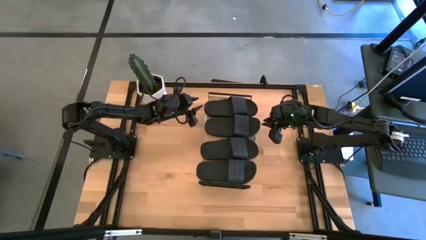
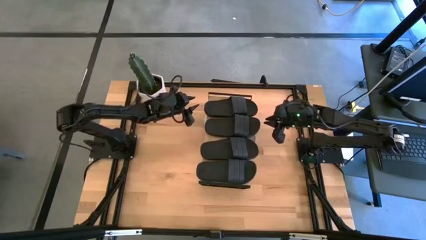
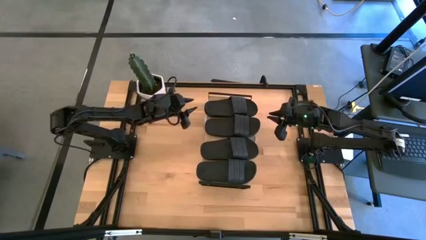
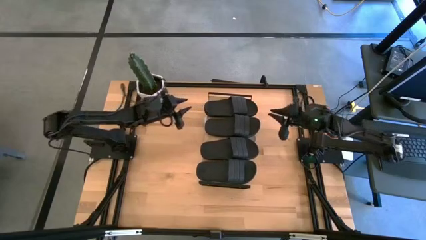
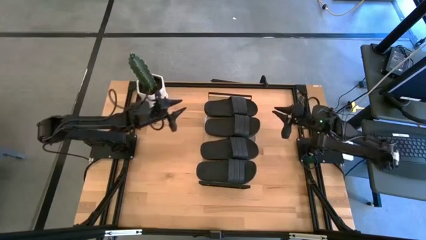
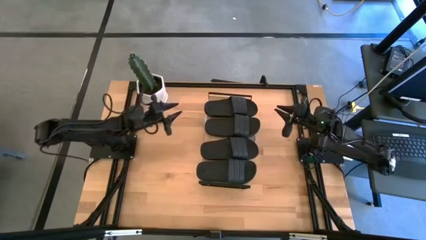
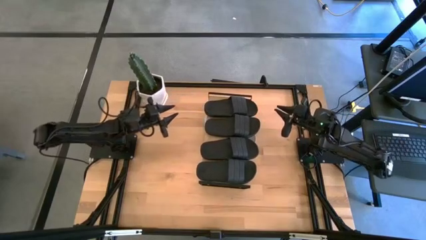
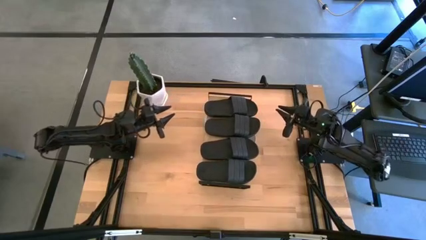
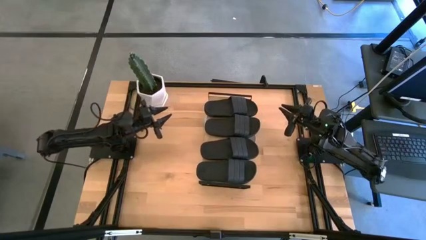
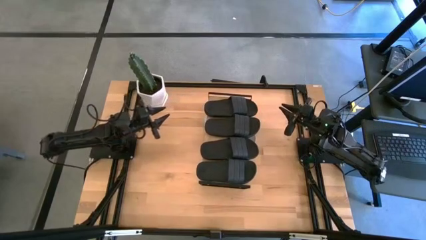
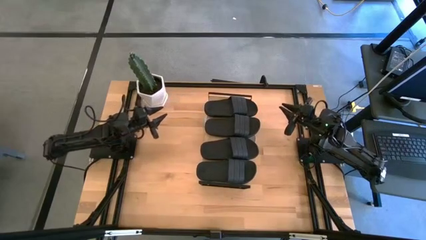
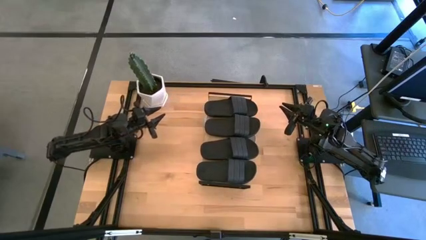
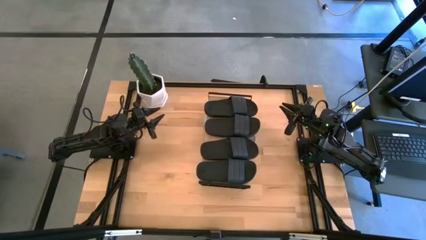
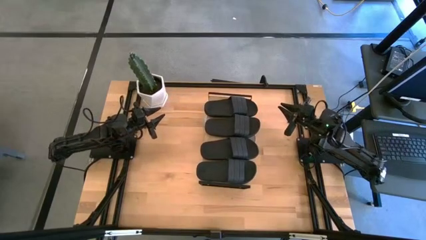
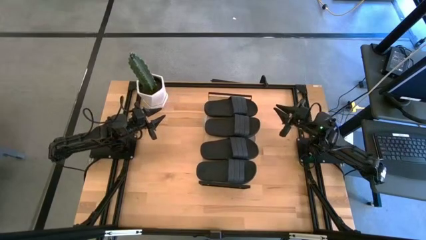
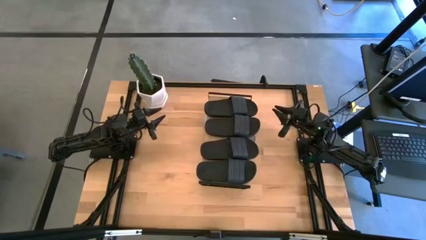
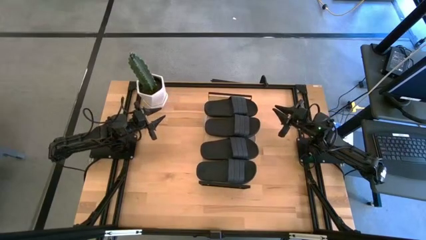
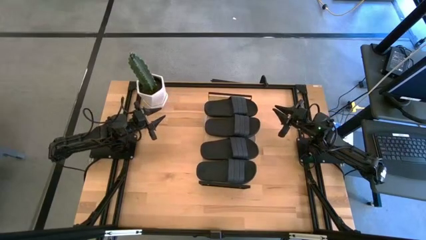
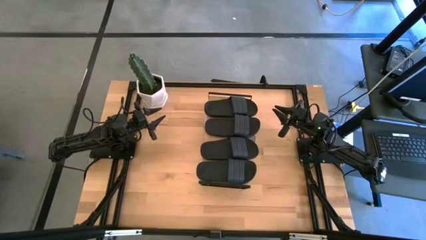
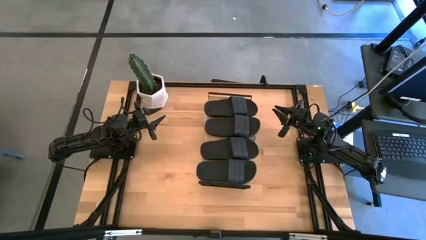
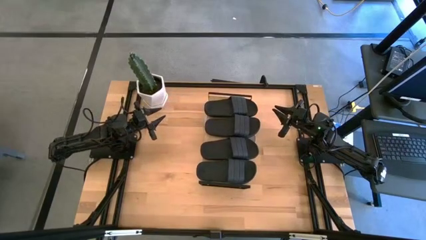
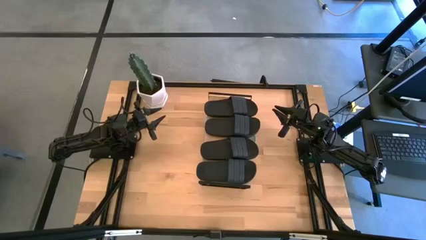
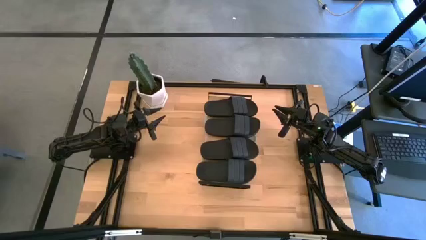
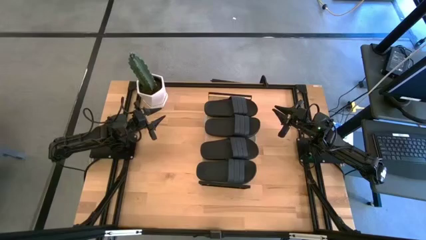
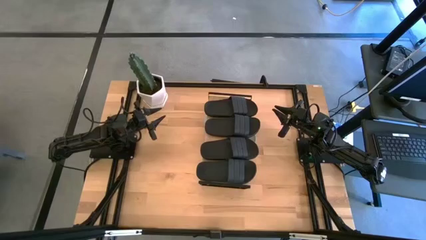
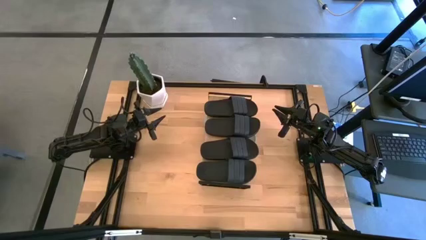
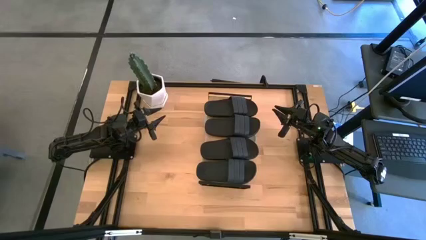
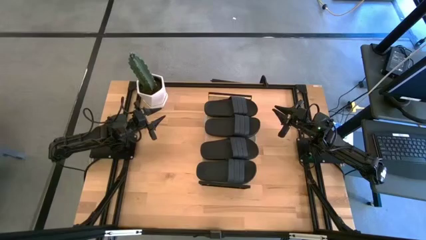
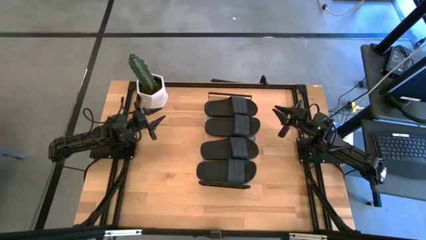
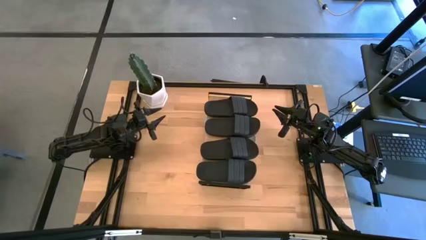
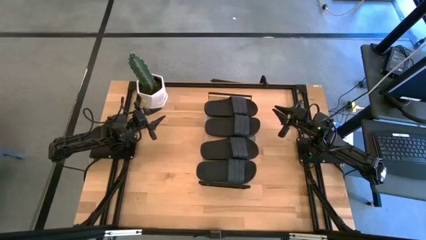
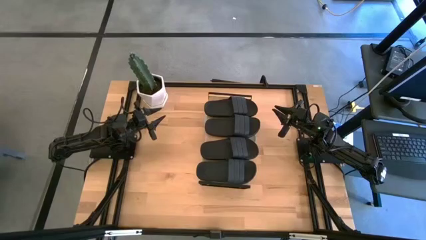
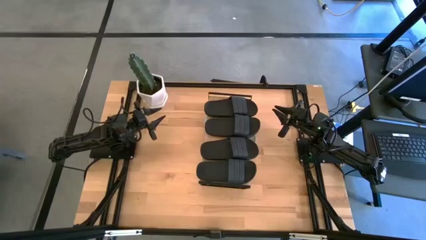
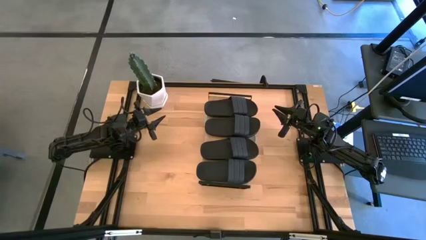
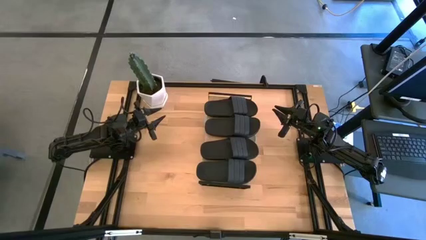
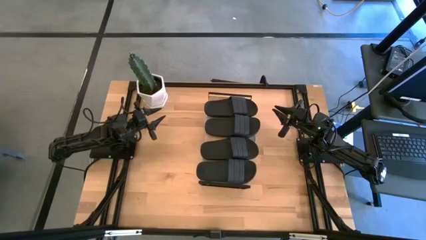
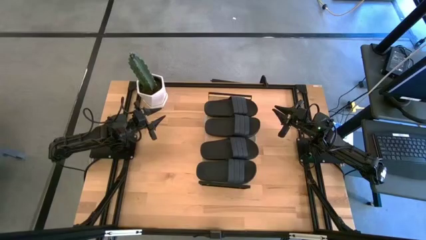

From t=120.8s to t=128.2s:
Task: Pick and place slides into the shelf
Return to Home Position

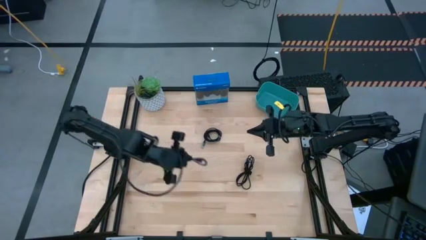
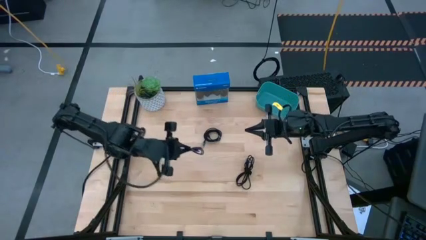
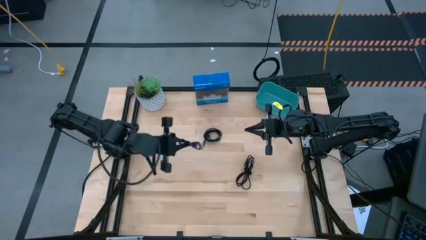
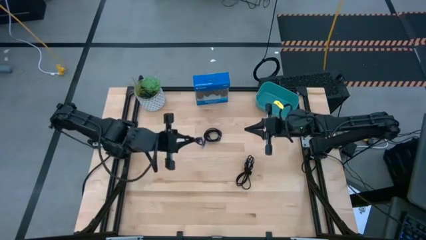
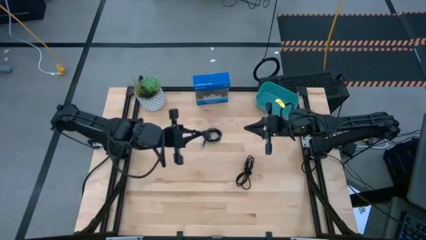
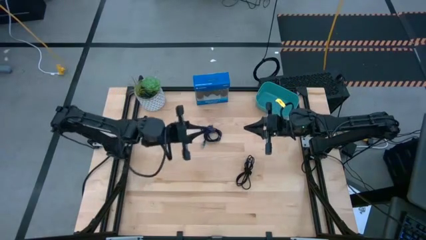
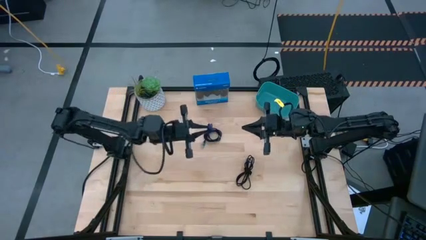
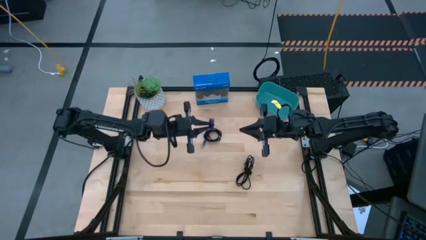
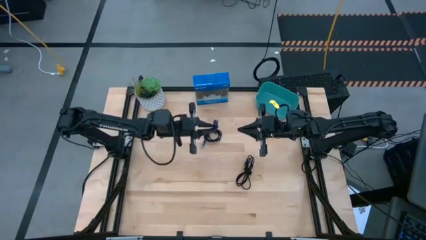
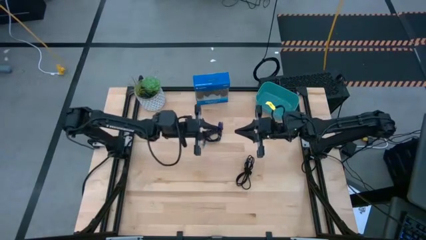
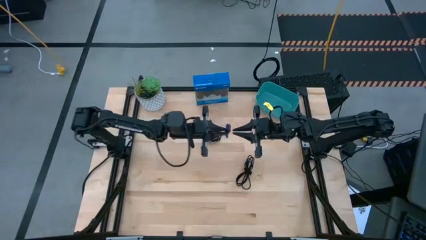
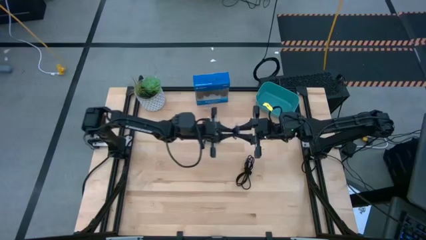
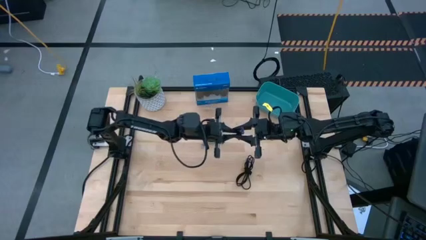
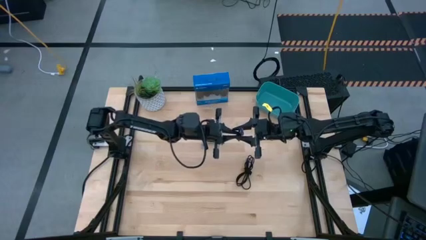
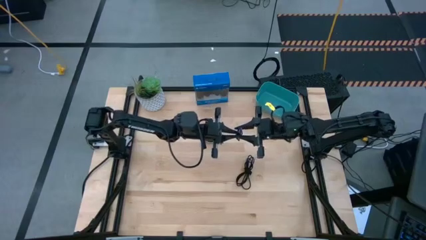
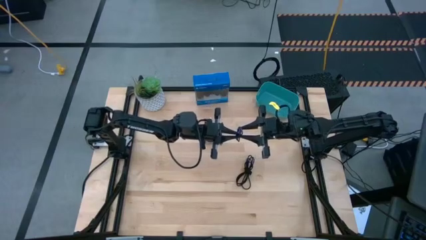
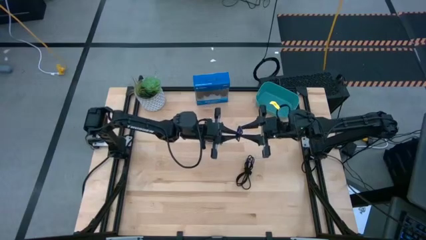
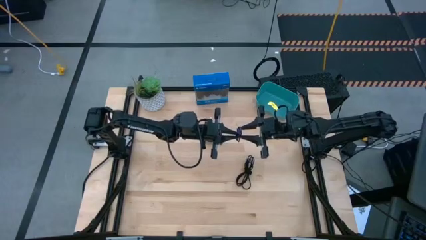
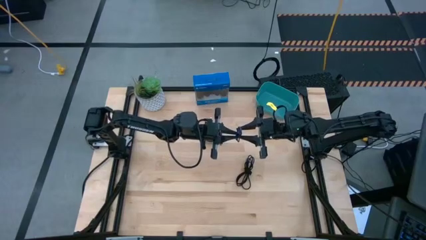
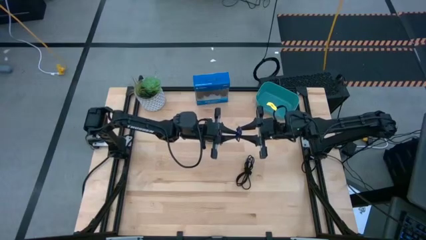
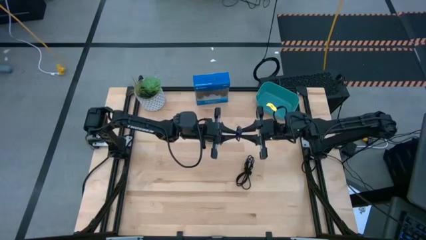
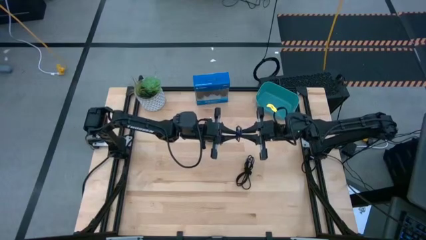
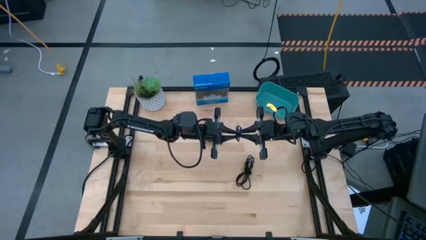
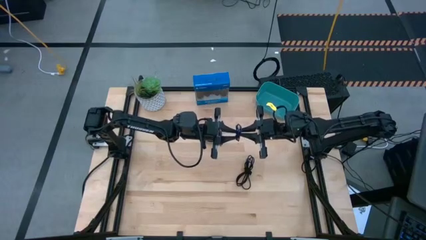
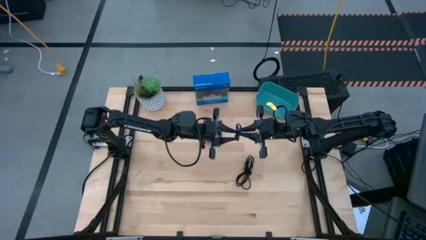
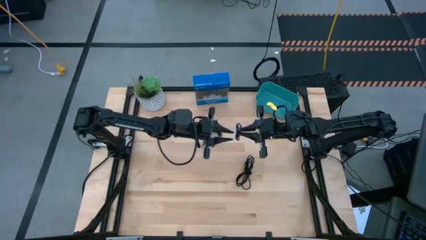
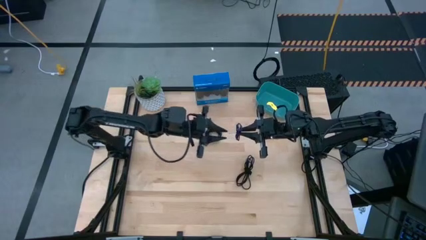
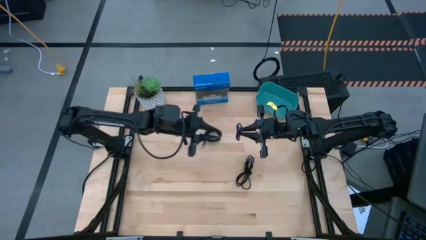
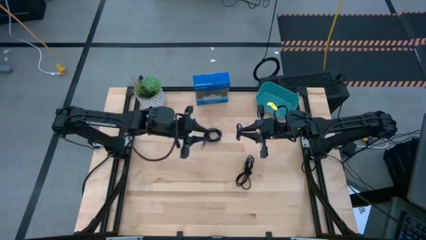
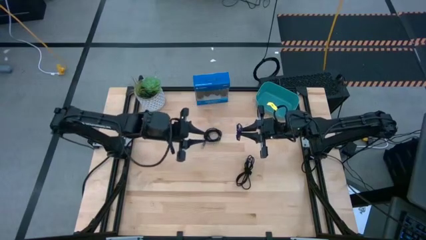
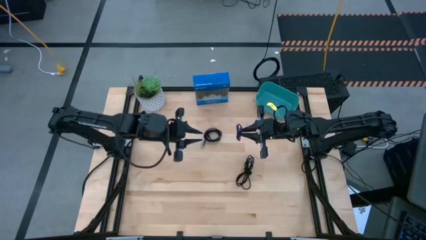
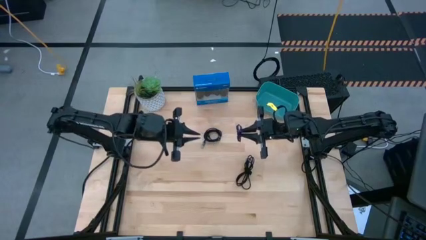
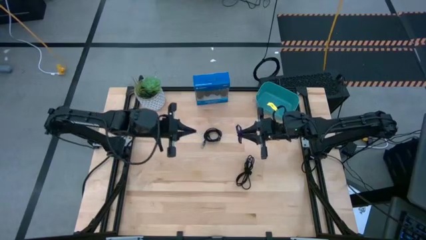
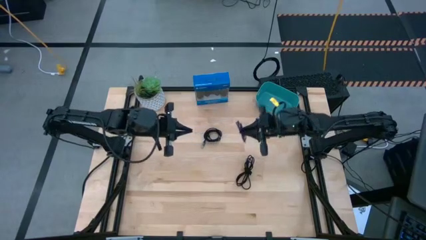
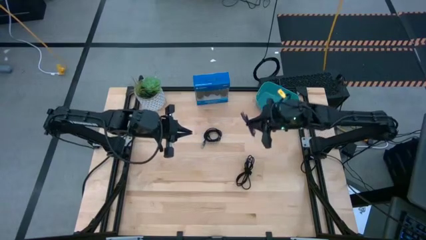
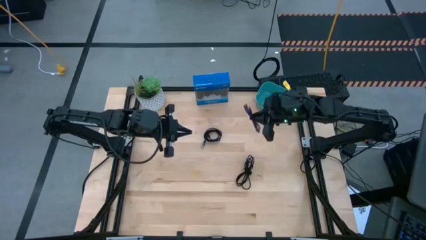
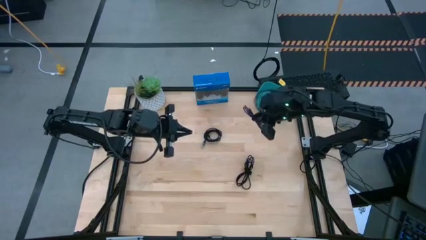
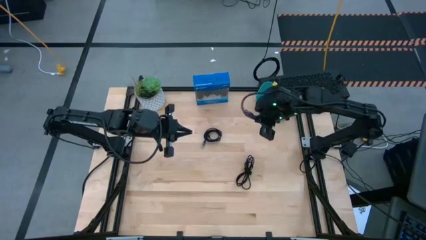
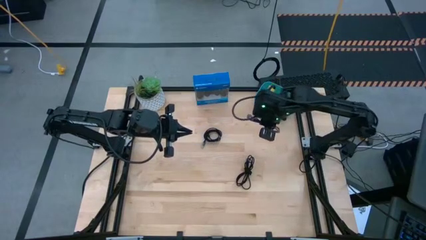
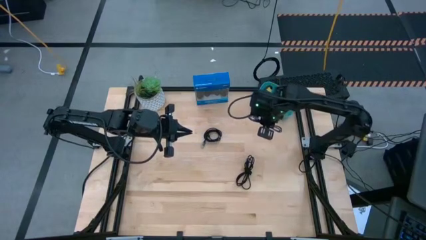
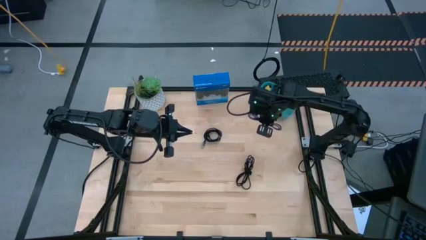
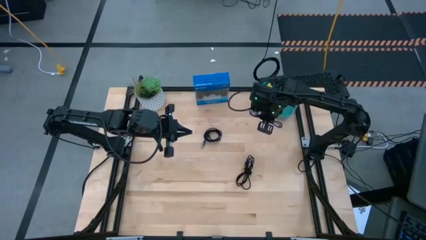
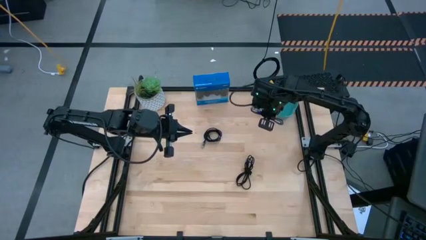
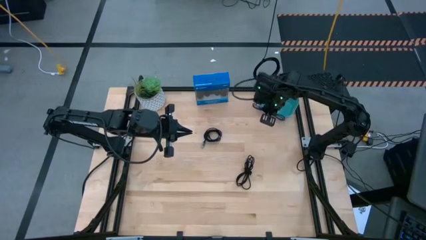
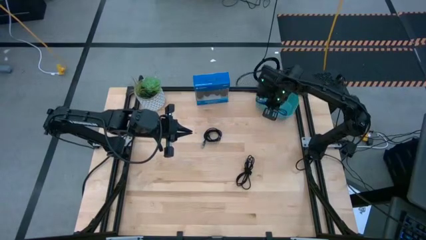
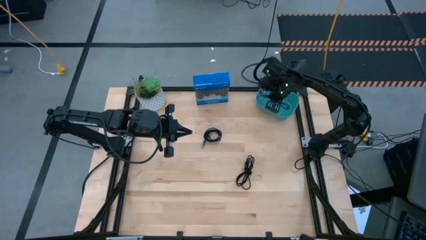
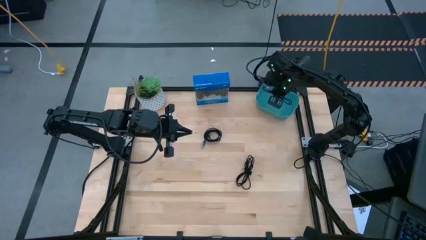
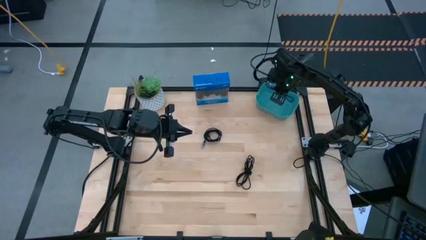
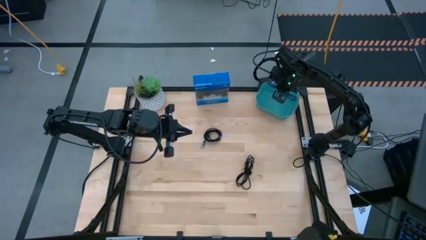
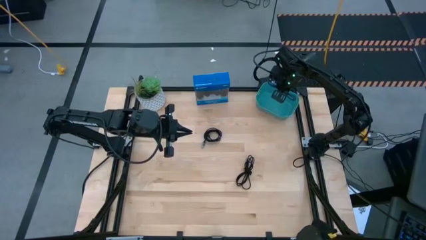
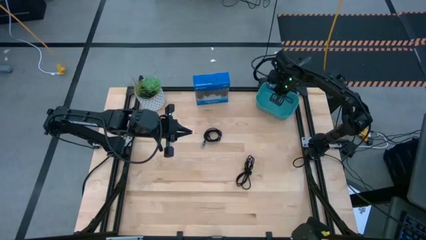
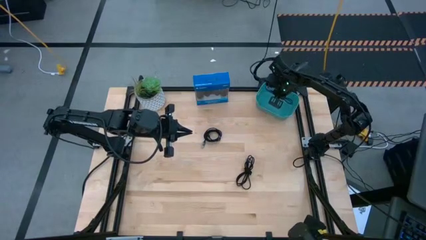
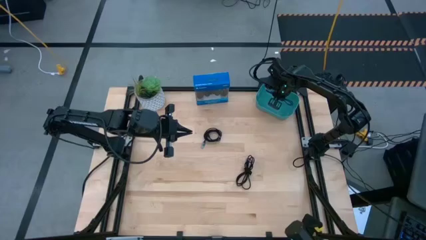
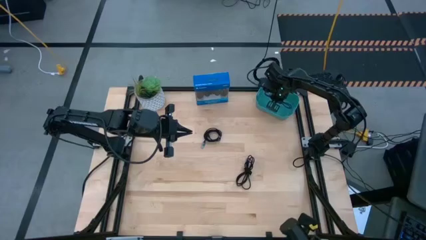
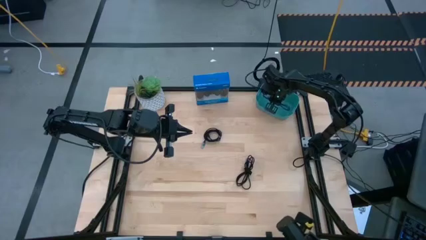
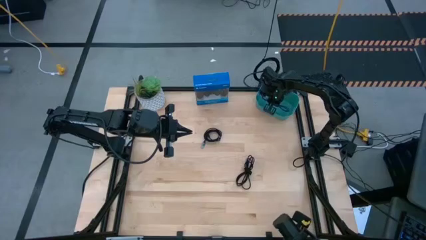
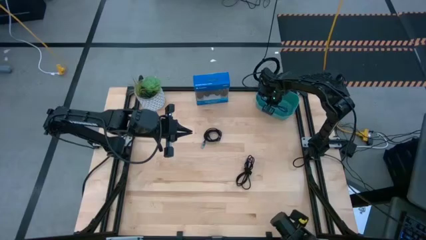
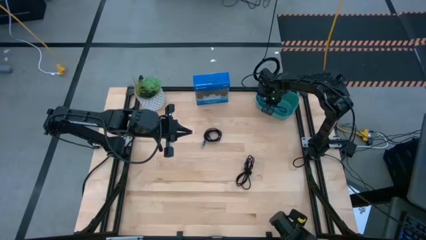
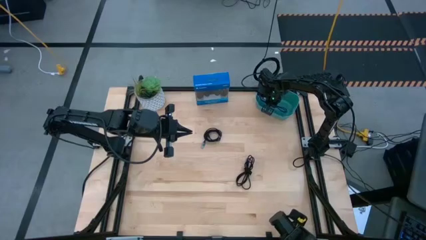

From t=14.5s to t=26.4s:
Task: Pick and place USB-C Cables
Put the violet charger cable into the green bin
